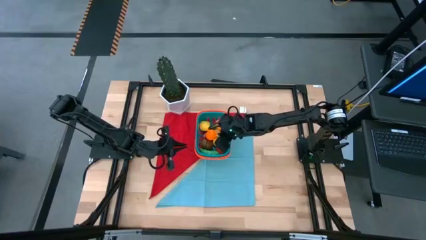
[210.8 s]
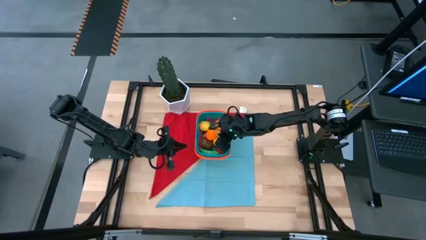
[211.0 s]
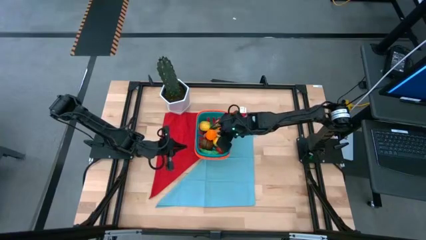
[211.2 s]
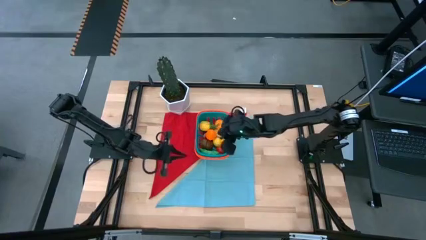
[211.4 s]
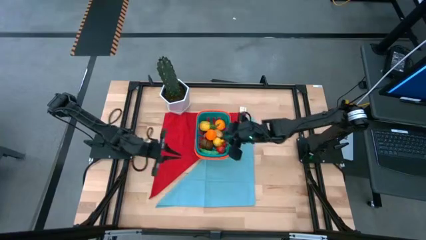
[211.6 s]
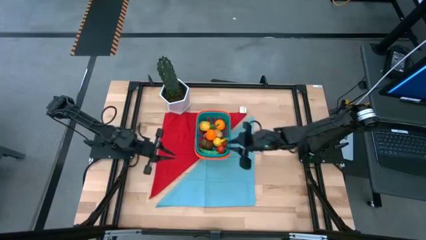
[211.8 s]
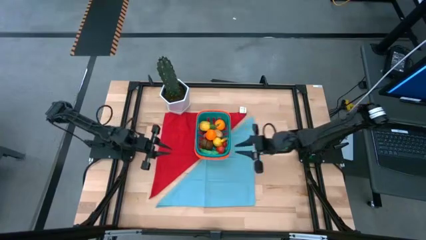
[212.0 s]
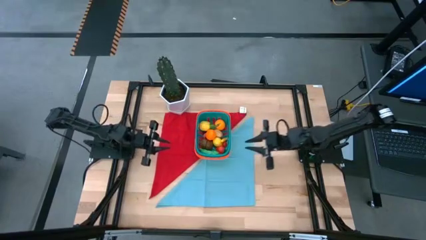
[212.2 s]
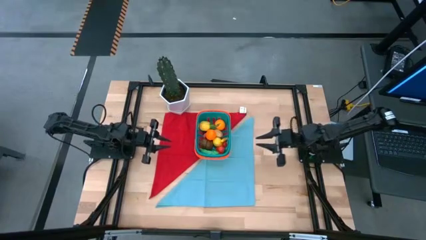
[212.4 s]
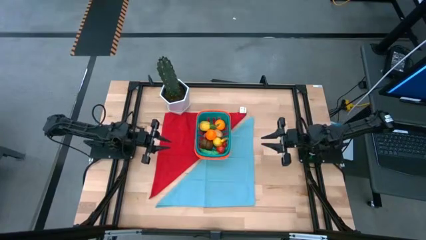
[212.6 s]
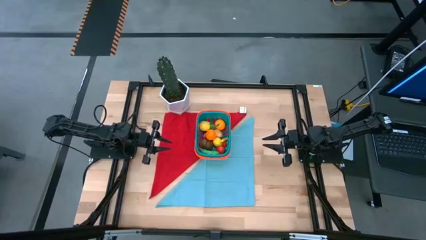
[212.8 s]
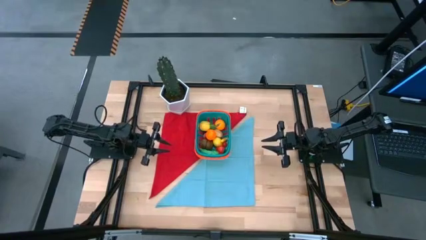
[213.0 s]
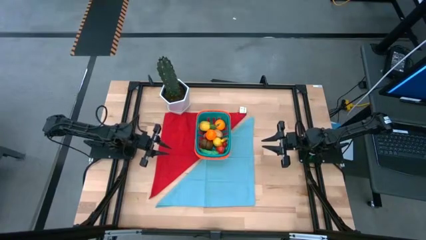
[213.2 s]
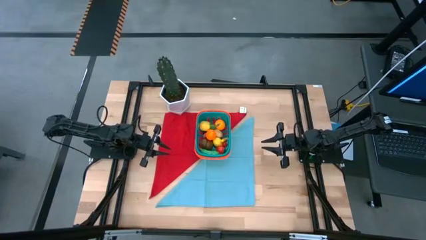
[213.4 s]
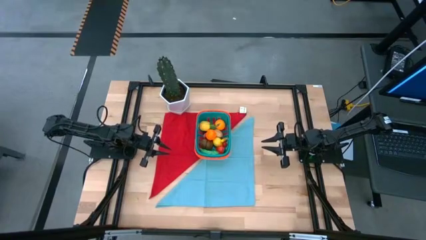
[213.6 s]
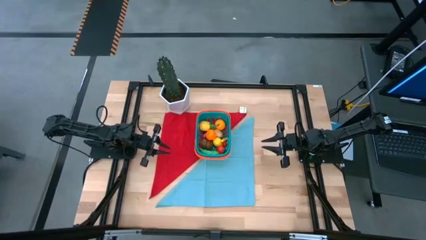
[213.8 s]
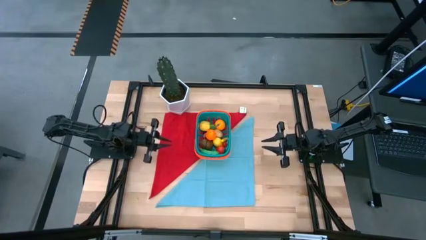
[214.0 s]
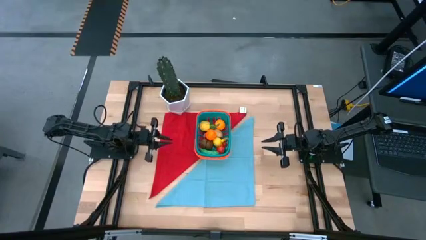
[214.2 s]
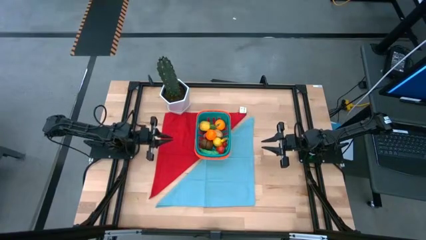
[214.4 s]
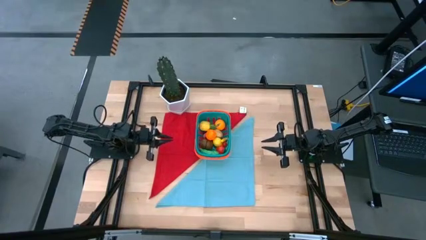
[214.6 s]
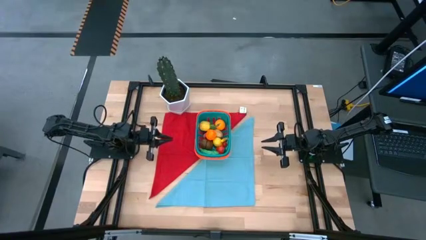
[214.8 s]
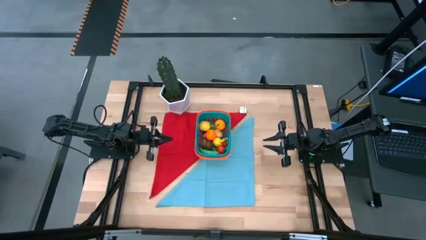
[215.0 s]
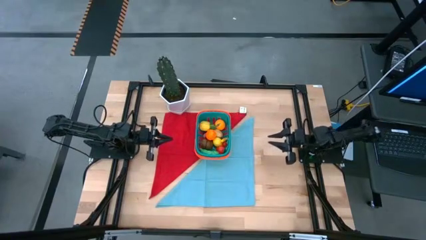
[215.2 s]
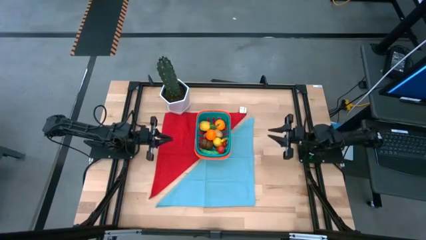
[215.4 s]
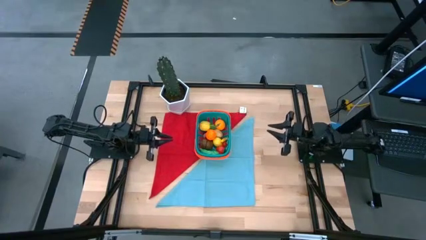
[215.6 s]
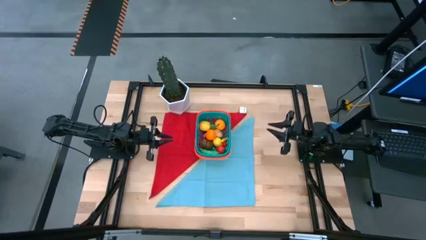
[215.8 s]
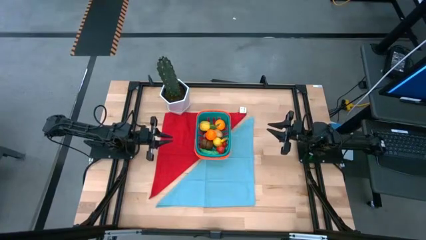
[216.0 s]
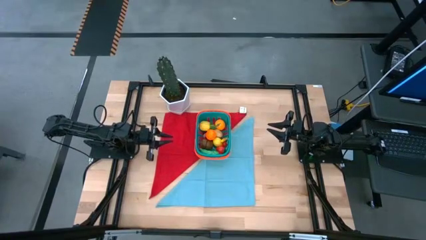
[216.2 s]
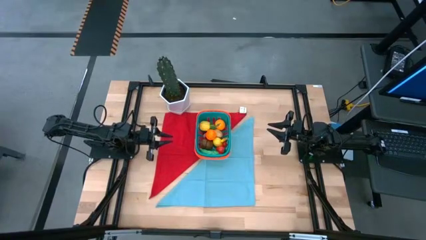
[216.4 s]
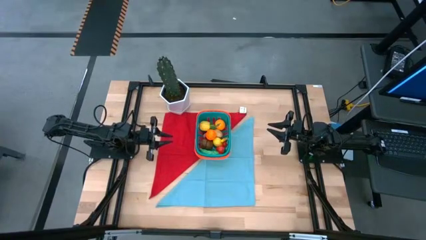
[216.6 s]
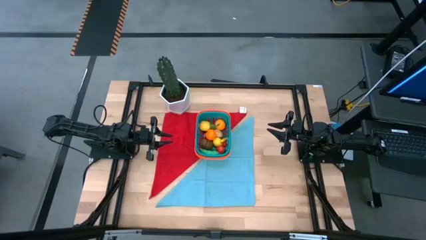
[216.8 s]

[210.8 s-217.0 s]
Task: Pick and placing Produce into tupperware
Return to Home Position

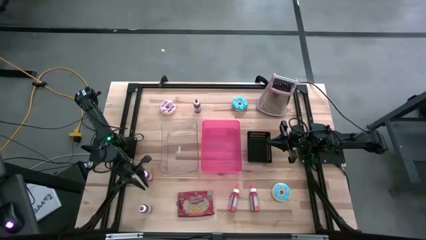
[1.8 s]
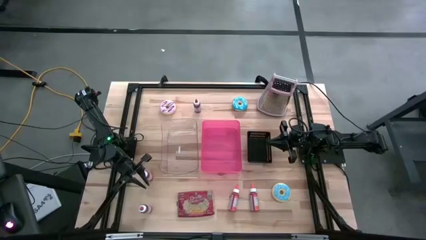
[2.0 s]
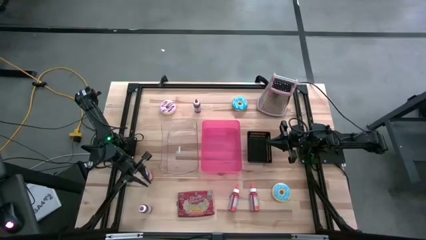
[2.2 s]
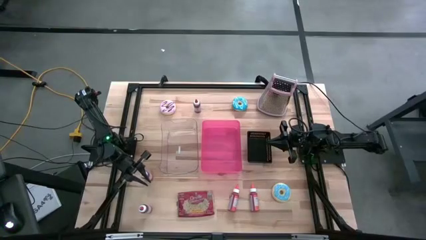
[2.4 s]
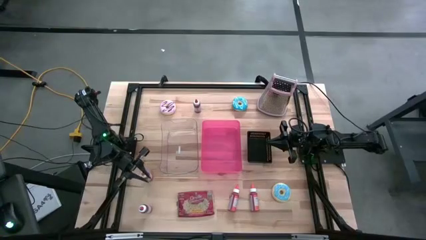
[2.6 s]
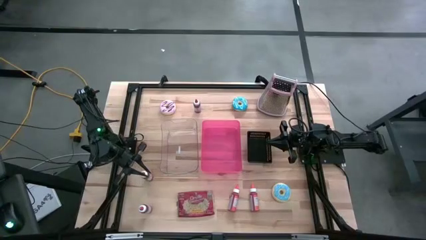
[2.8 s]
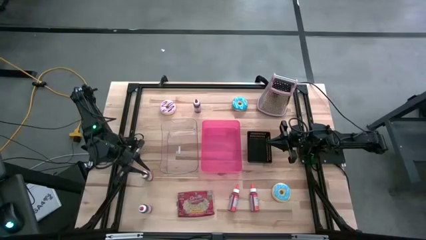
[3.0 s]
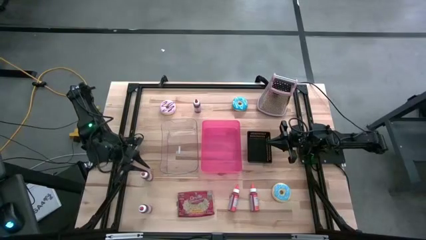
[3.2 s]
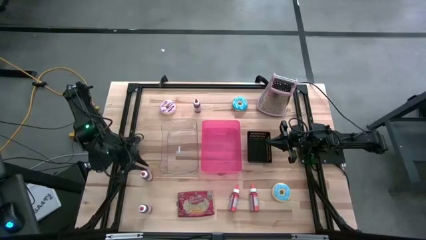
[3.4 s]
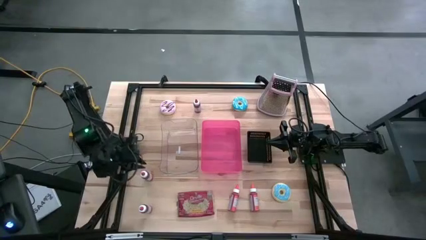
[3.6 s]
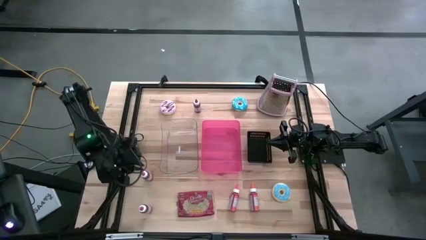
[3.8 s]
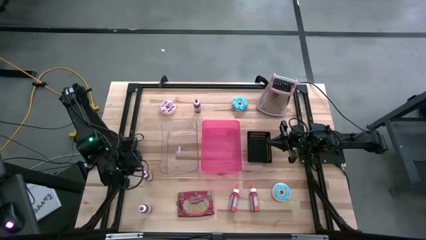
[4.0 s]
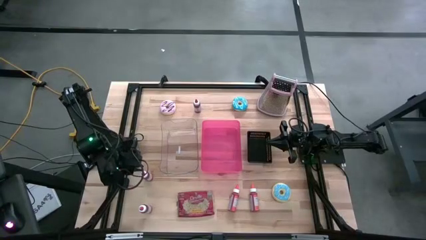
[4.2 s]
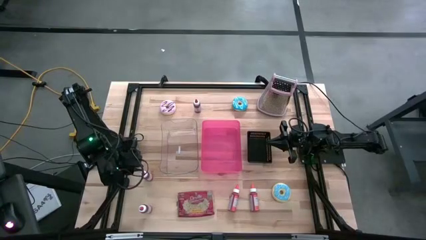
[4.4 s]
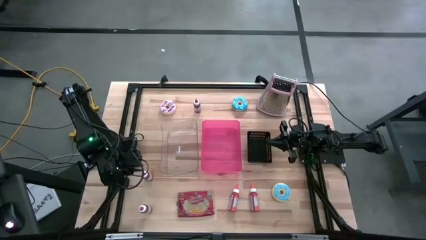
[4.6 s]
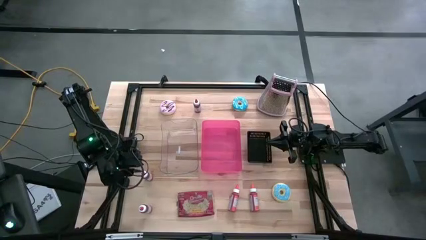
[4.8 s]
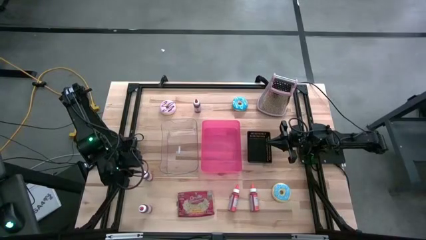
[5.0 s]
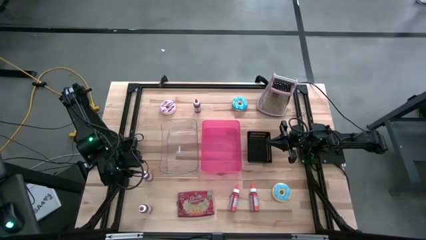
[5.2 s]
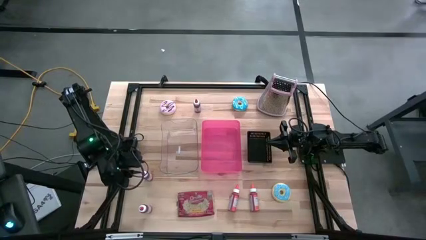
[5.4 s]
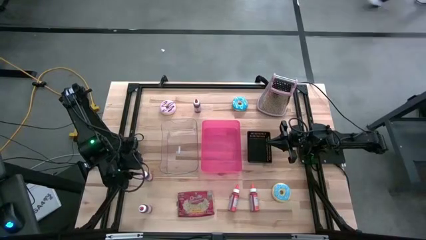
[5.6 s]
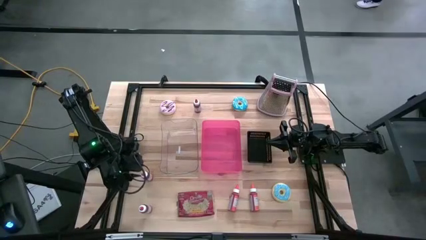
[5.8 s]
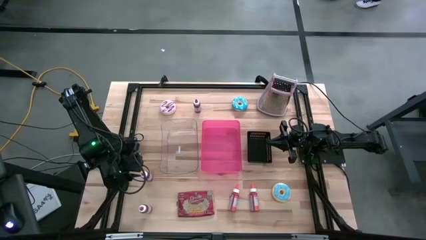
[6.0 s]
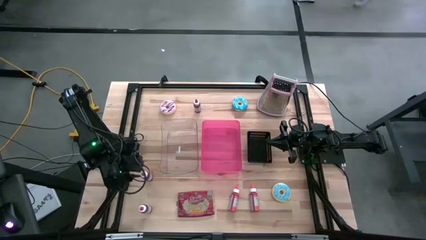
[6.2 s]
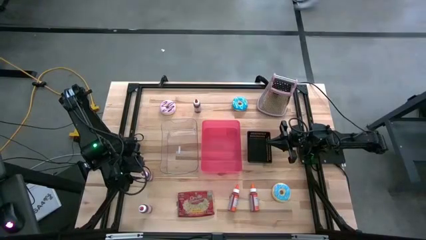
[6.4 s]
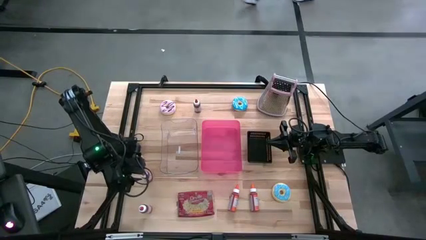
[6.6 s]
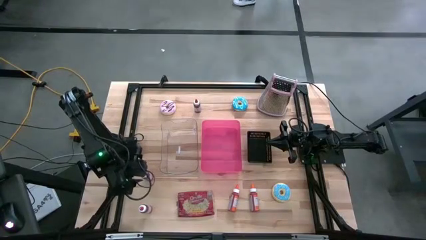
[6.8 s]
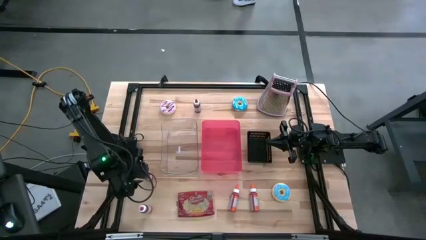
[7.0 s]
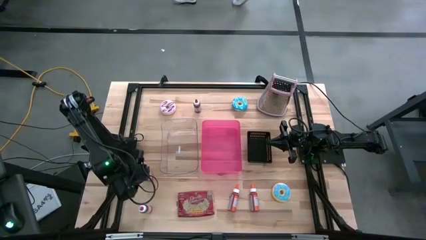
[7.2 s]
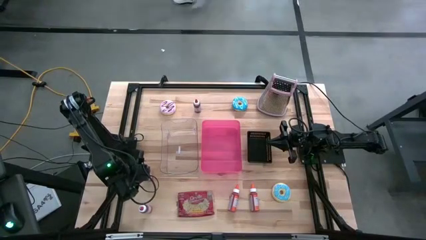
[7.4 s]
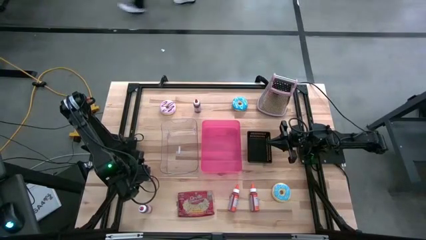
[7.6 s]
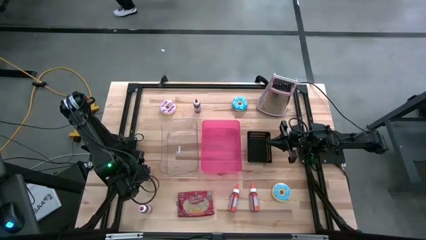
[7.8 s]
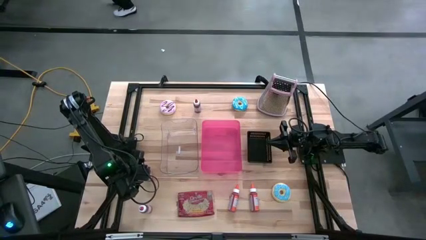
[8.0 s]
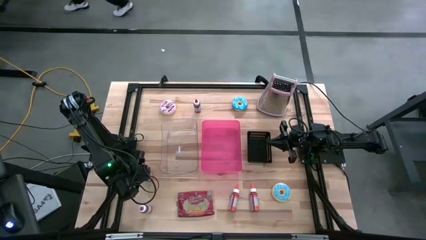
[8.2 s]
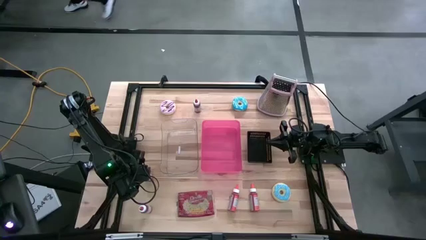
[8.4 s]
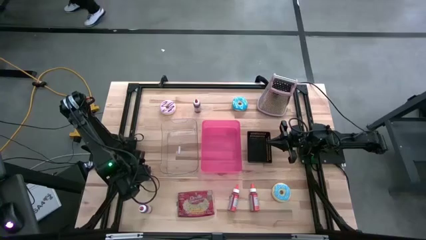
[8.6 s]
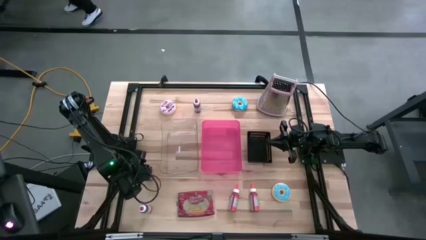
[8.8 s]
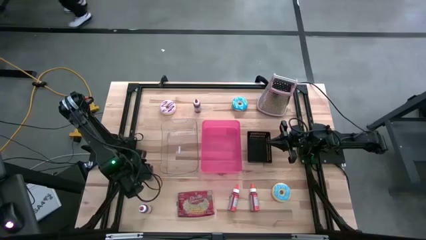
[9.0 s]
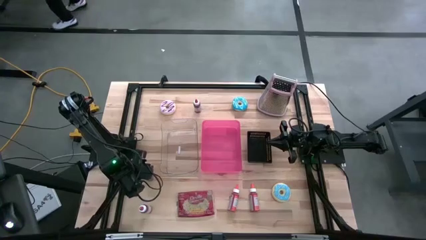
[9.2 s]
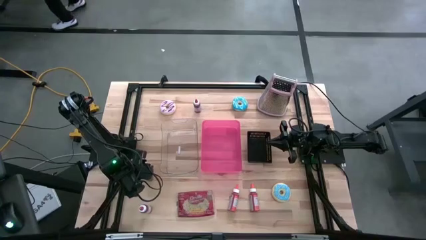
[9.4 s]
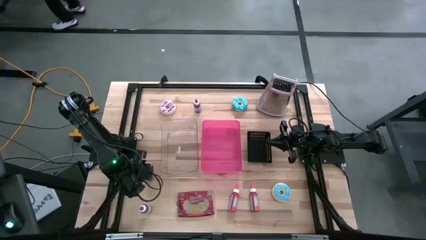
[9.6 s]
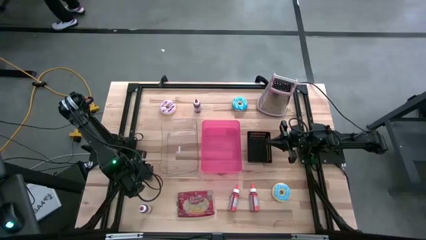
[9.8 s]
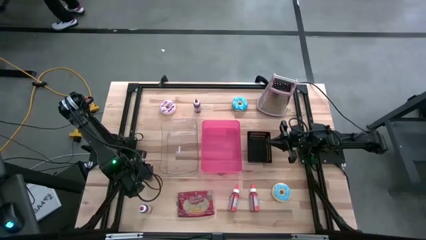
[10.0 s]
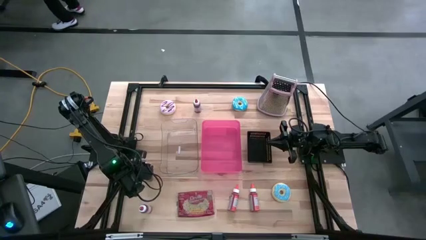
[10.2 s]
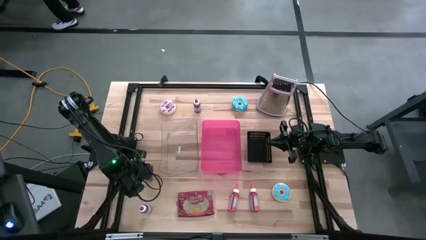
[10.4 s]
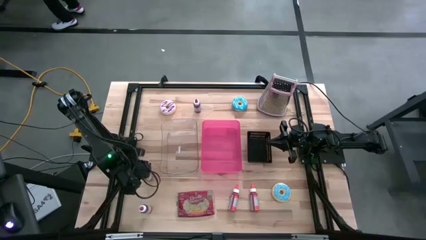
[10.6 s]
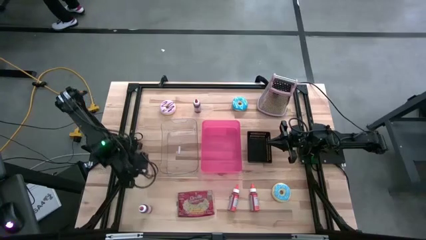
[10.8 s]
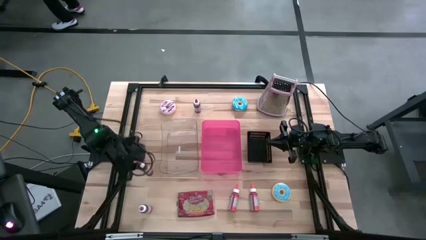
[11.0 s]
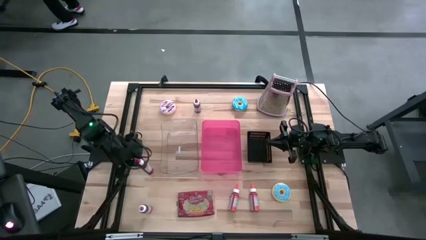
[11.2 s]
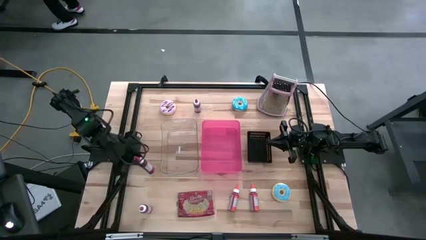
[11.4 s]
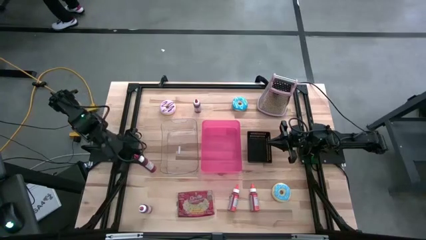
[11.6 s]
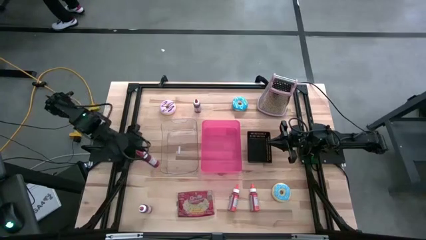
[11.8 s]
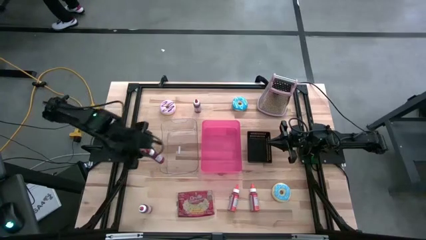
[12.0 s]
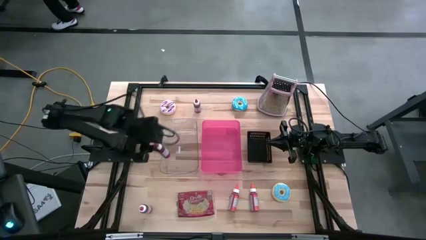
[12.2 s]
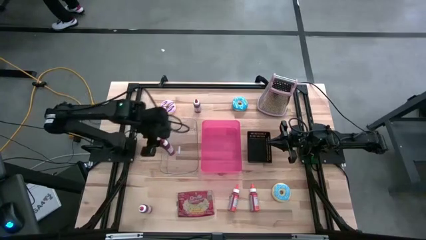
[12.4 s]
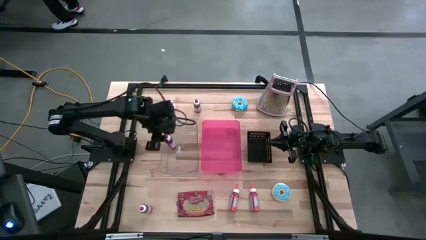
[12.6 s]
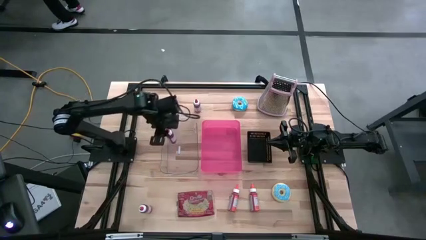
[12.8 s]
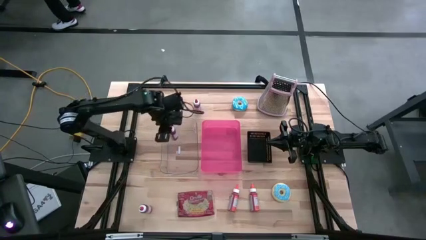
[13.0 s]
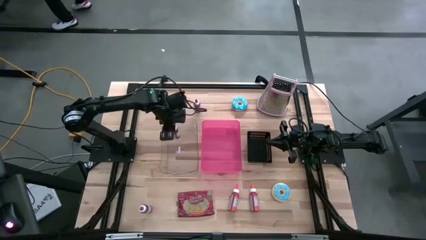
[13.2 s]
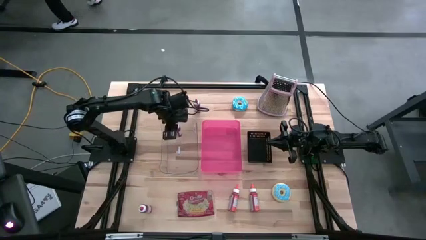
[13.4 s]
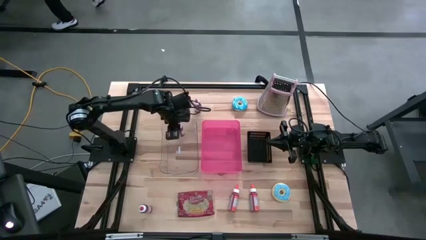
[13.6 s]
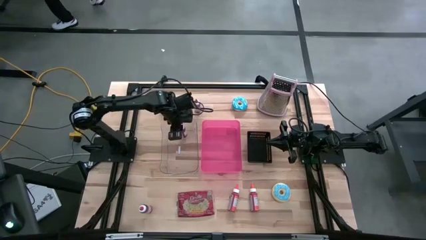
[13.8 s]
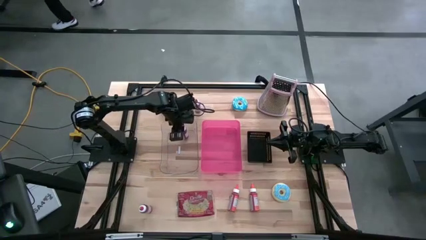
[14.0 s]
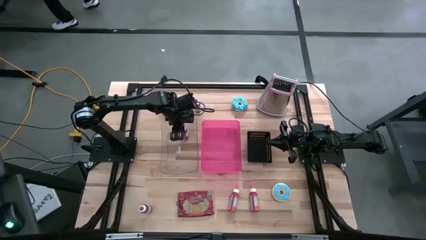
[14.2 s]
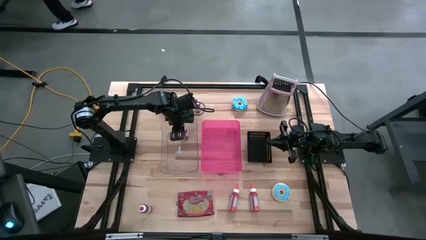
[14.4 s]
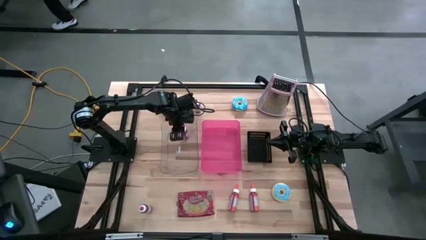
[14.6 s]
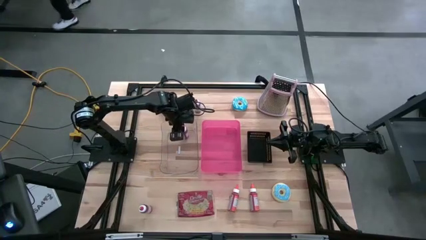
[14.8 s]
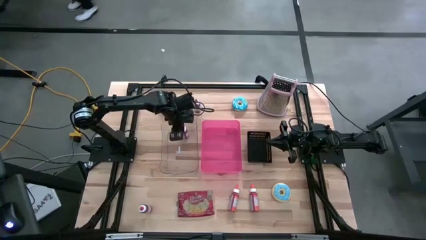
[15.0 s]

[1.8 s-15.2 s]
Task: Pick & Place Food Item
Put the middle red food coloring bottle into the transparent bin
